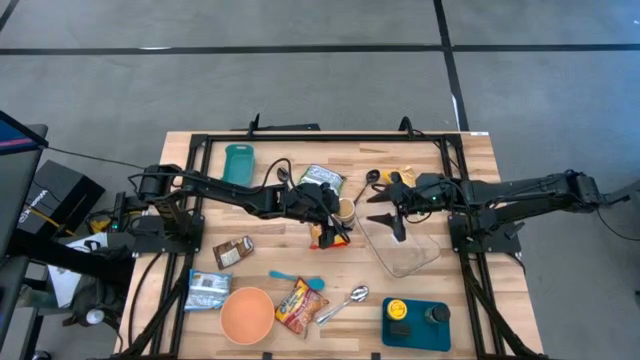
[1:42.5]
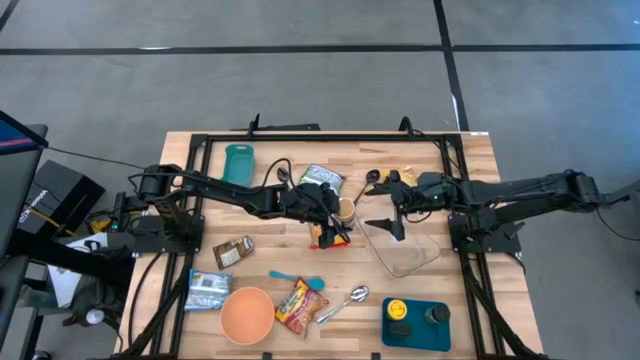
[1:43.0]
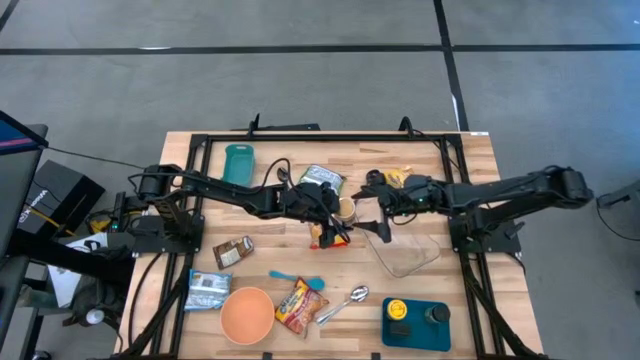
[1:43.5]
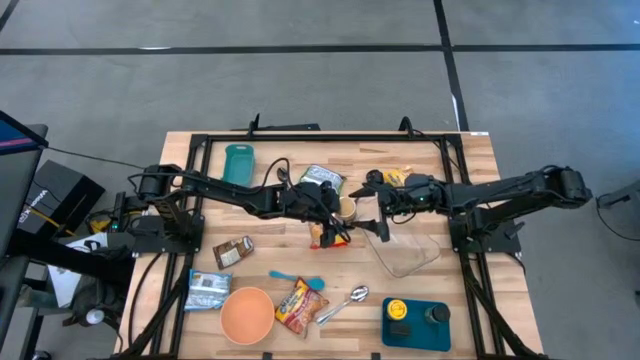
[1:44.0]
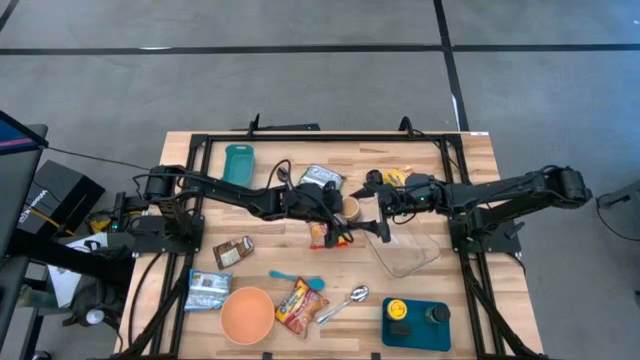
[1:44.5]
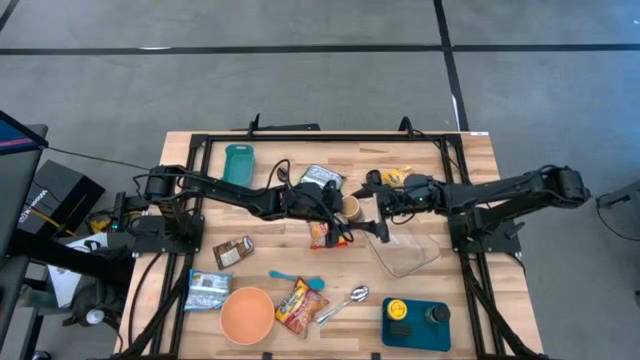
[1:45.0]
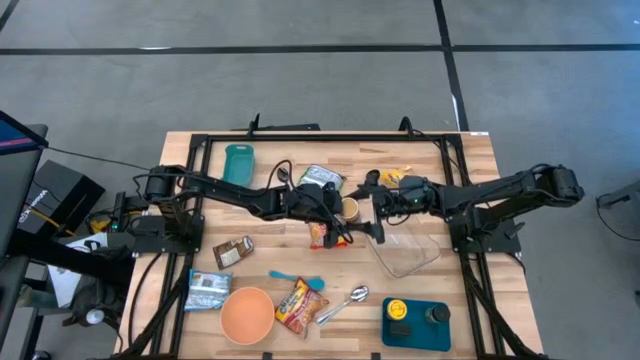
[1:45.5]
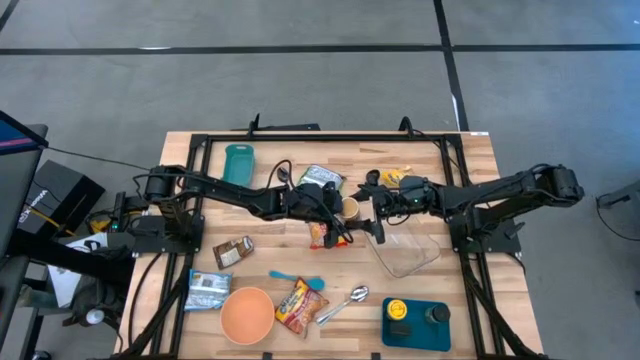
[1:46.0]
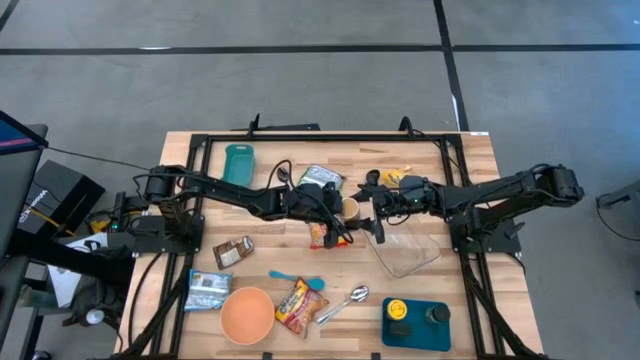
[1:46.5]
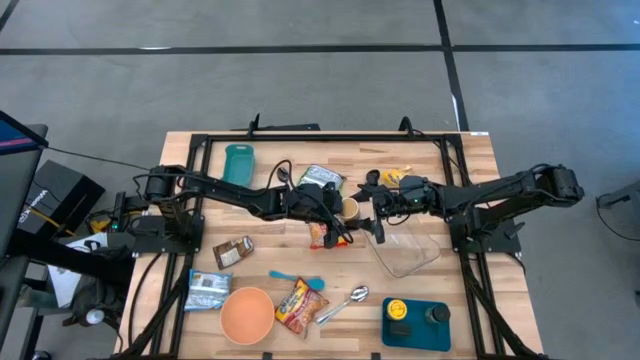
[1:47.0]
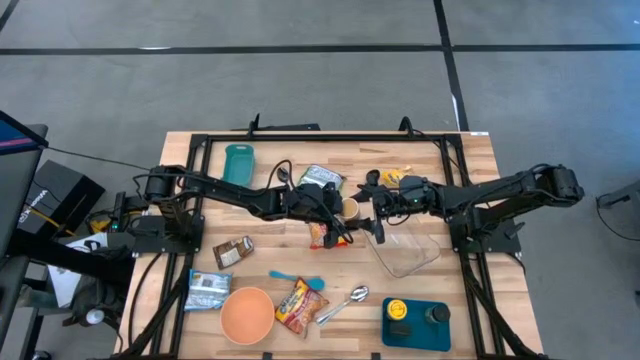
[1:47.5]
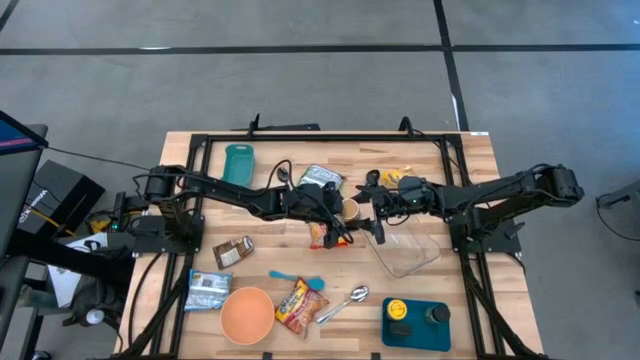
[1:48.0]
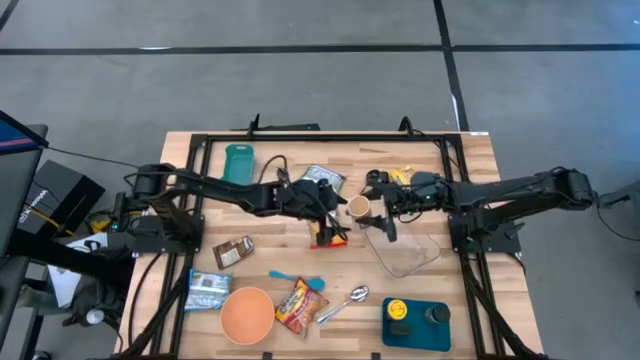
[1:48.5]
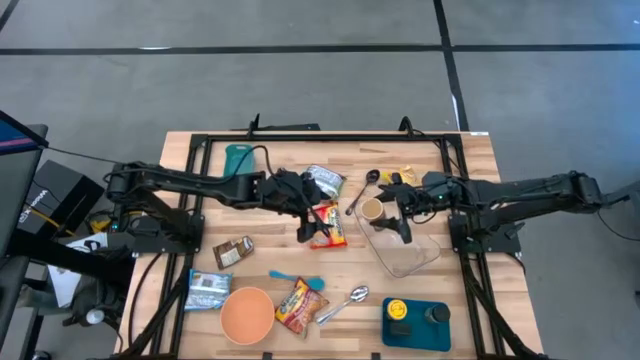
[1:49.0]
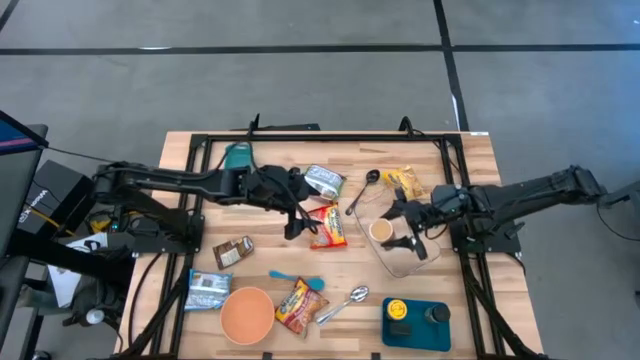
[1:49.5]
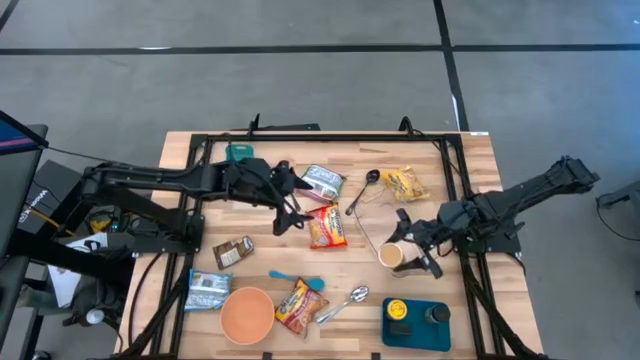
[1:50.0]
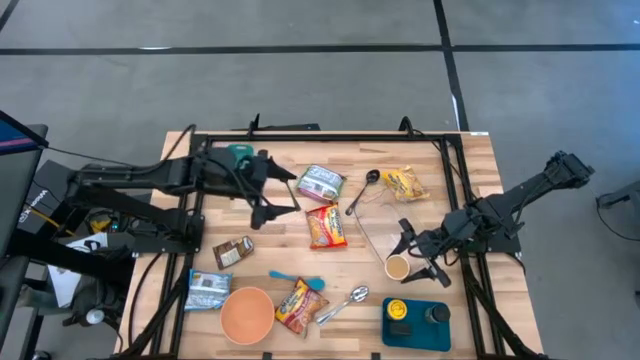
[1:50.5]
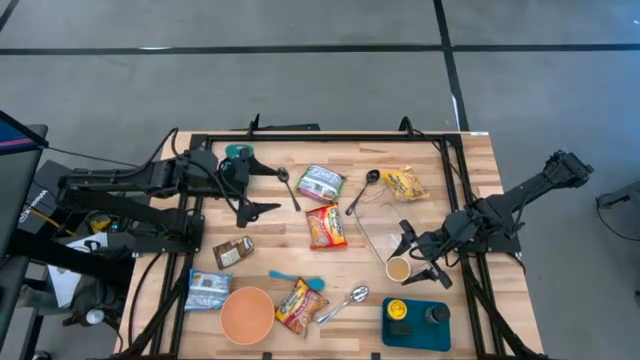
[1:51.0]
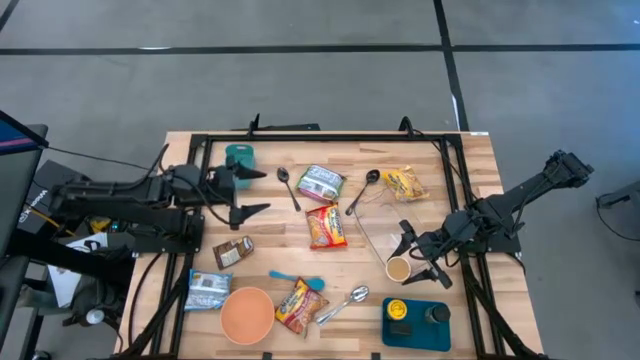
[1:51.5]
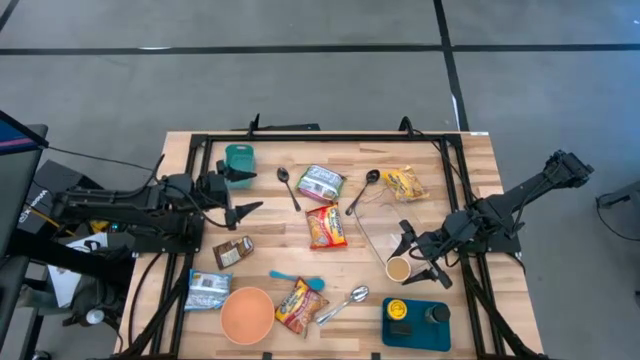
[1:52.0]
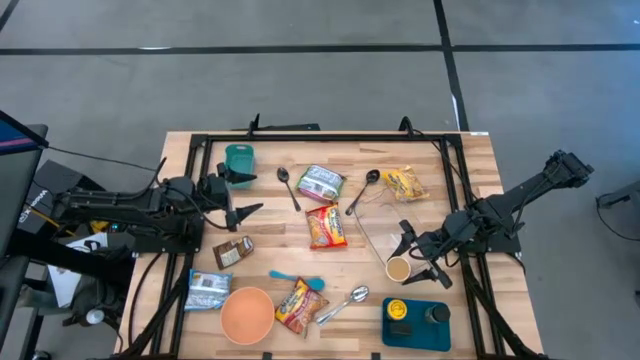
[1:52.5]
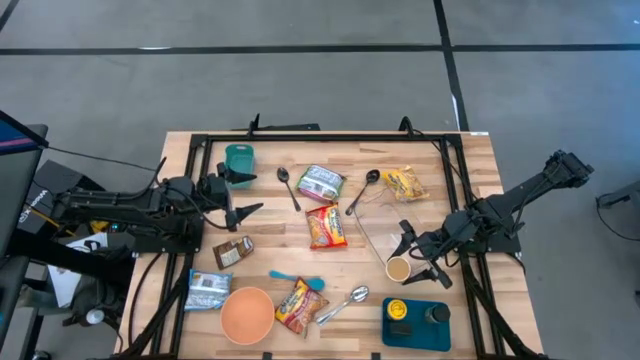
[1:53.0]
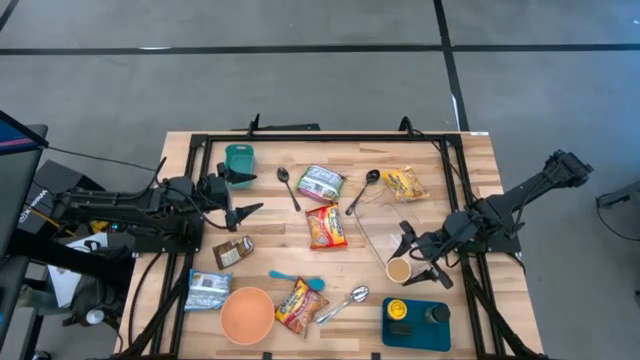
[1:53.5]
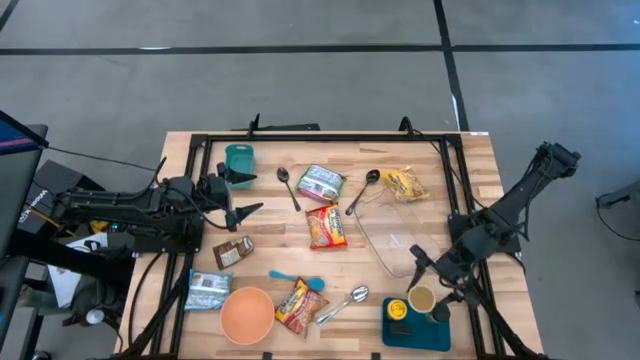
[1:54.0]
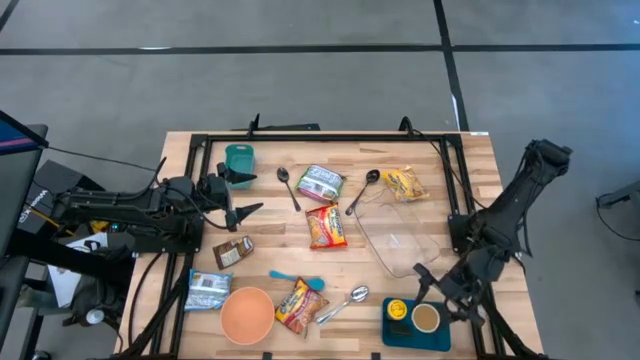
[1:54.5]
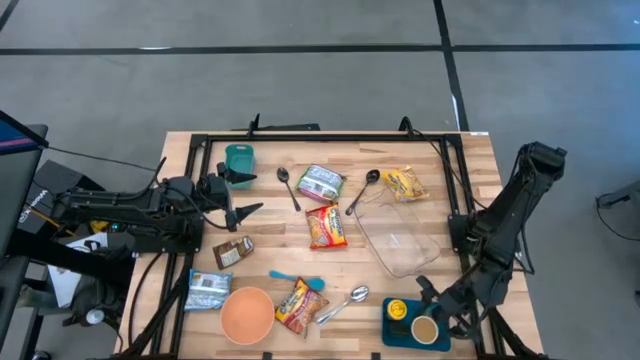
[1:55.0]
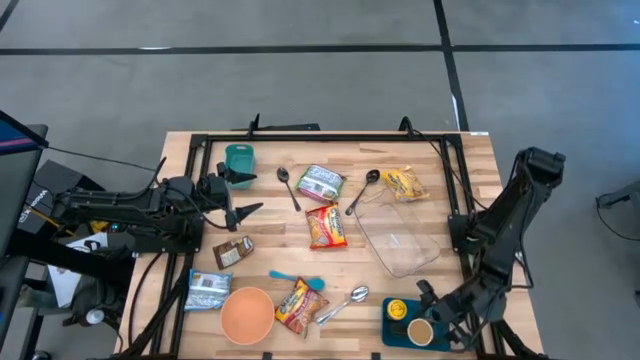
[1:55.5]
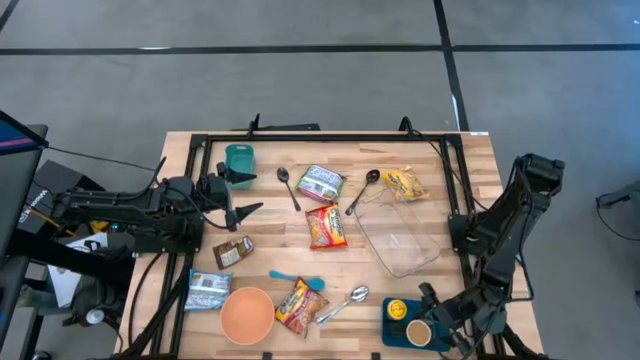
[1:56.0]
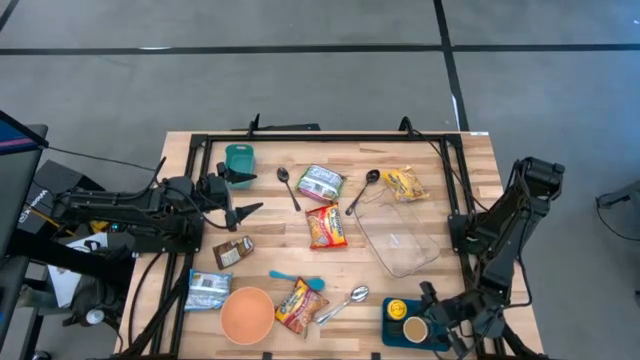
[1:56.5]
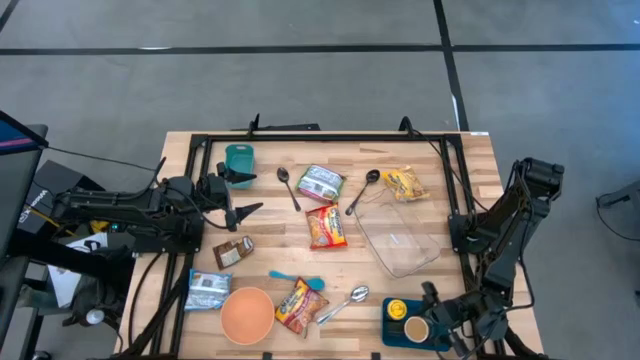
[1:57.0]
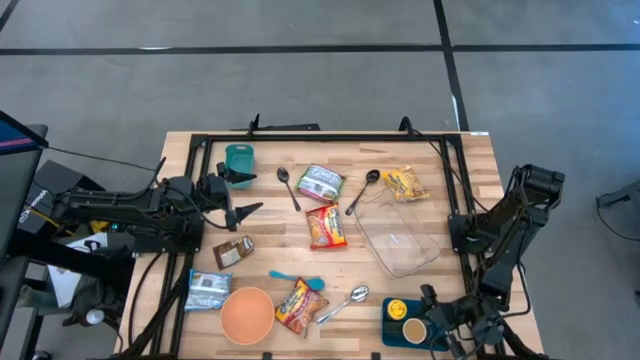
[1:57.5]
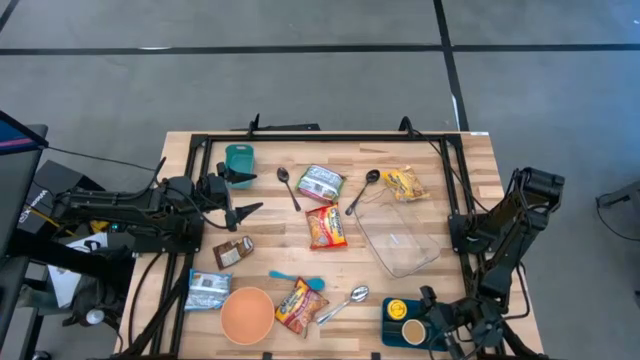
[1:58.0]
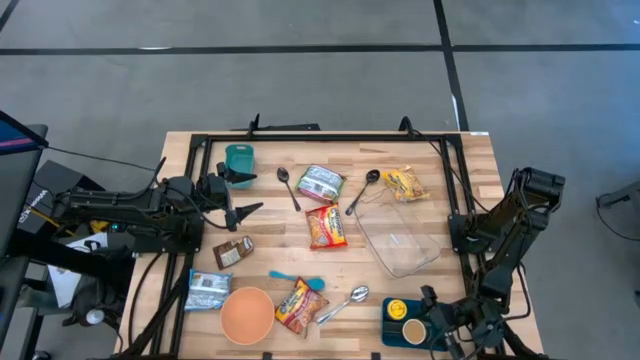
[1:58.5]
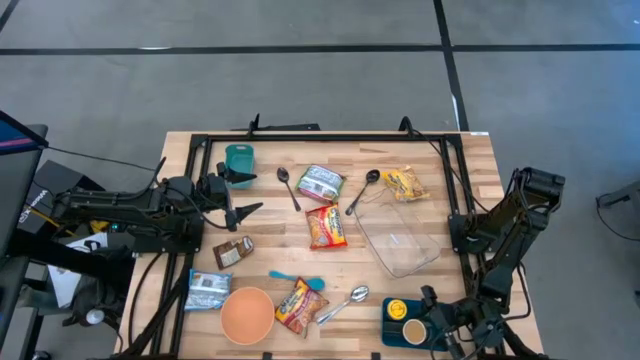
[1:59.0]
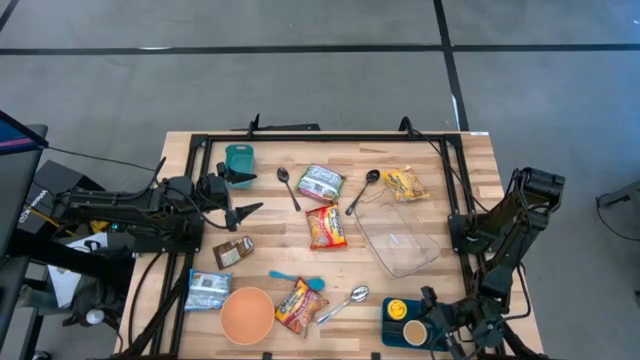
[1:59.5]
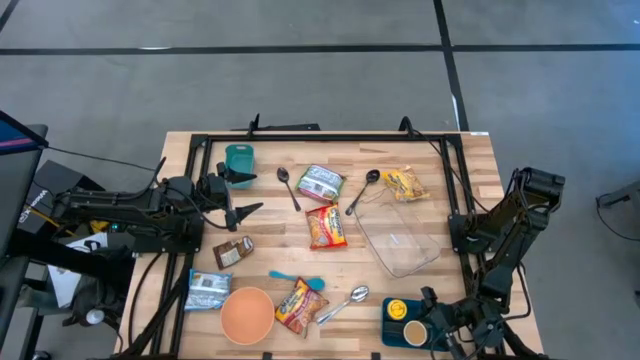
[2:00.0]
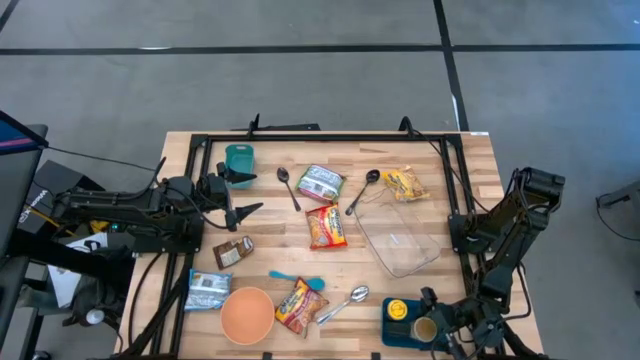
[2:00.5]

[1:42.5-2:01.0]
Task: Pick & Place Food Item
Put the golden spice bottle into the blue bin

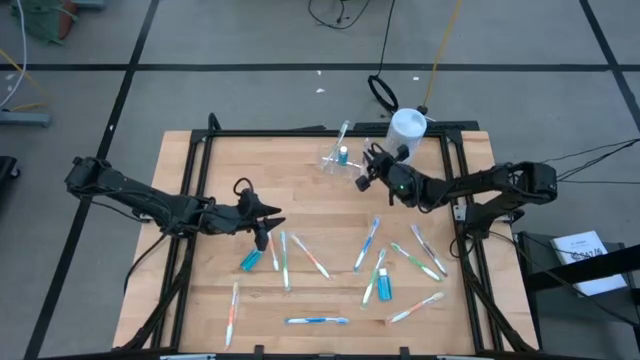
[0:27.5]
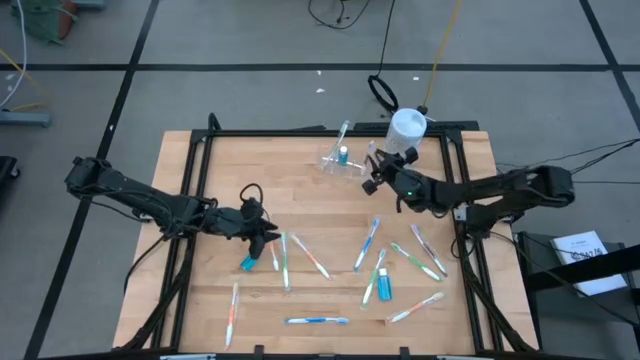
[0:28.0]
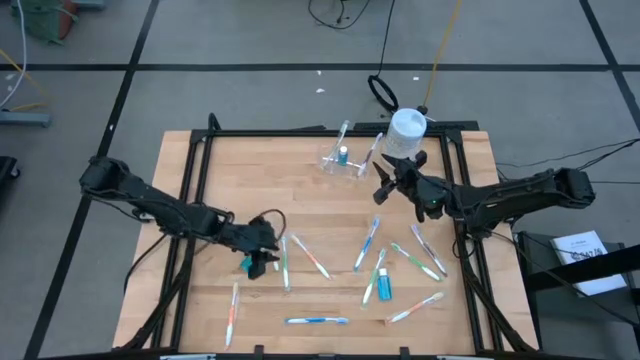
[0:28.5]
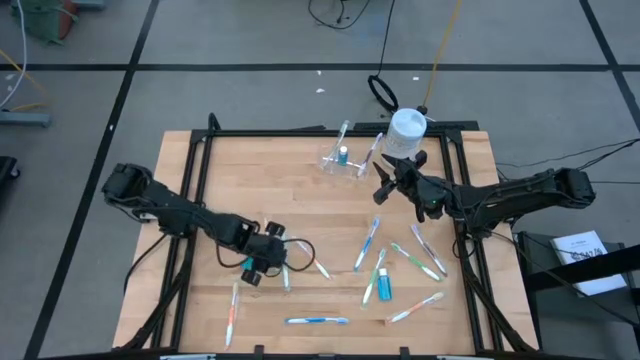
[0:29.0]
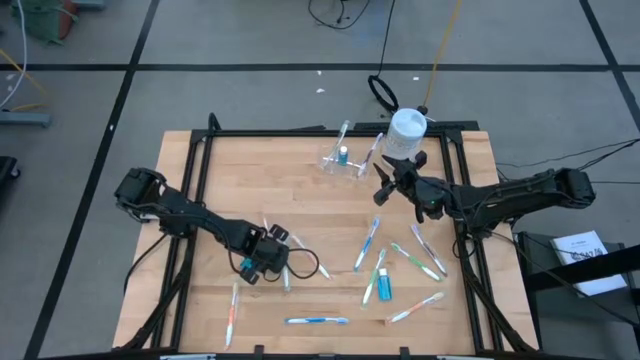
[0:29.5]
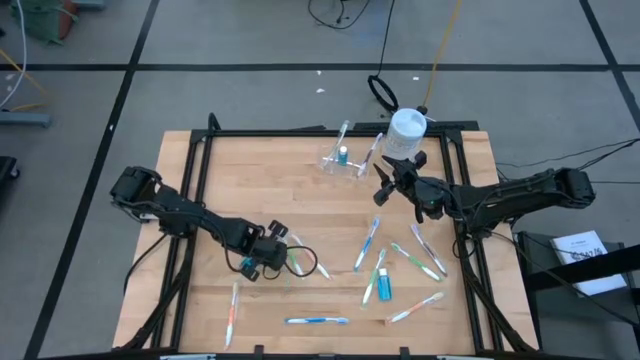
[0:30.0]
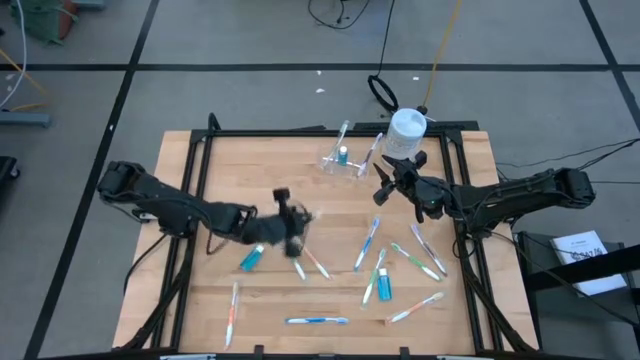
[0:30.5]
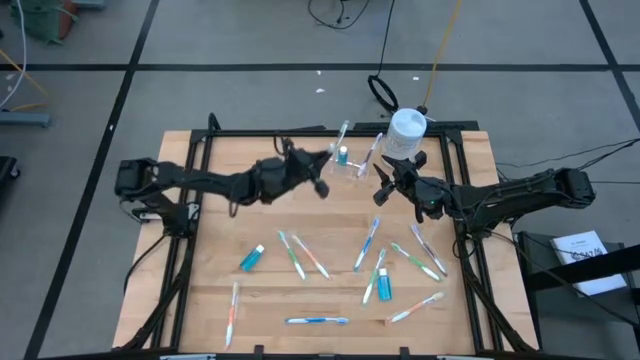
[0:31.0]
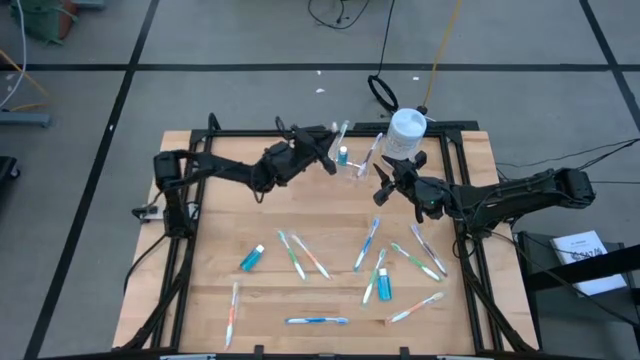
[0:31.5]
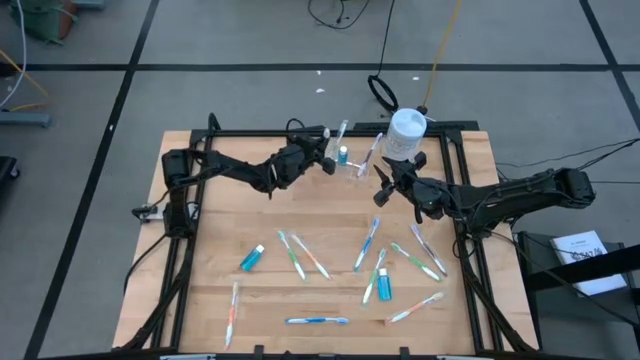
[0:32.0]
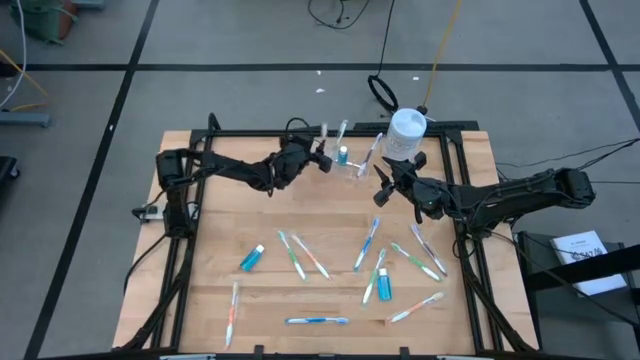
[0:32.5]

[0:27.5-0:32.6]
Task: Pick & Place toothbrushing station
Put the orange toothbrush into the transparent organizer
